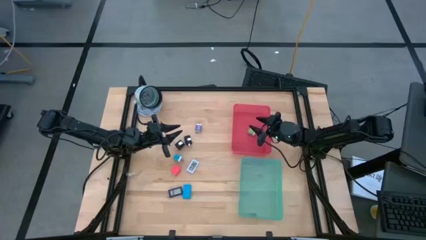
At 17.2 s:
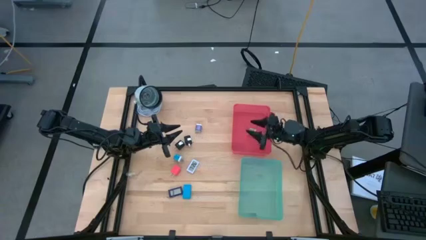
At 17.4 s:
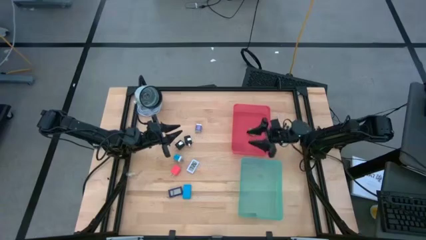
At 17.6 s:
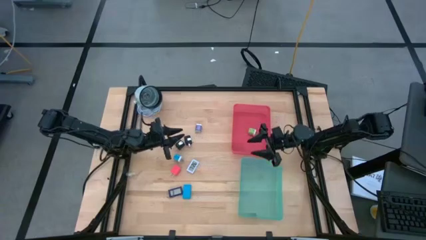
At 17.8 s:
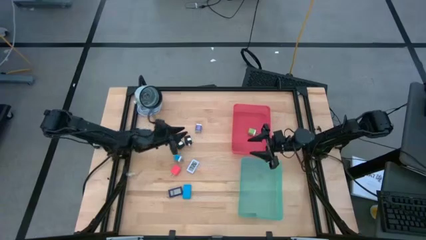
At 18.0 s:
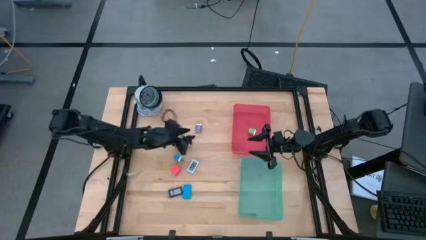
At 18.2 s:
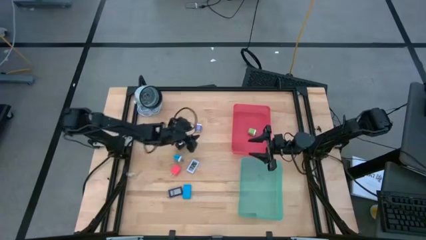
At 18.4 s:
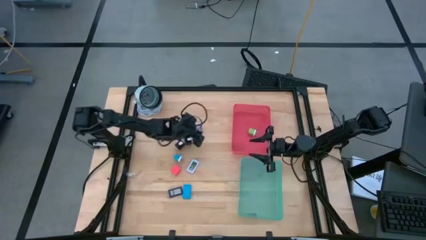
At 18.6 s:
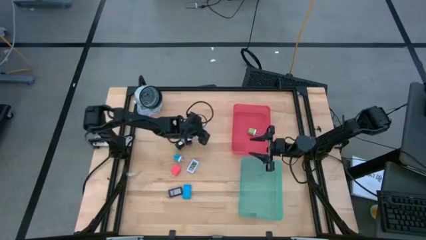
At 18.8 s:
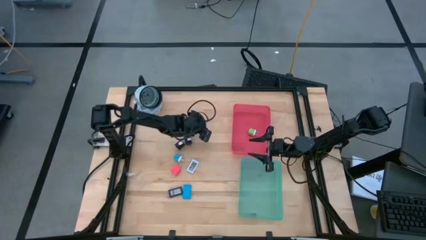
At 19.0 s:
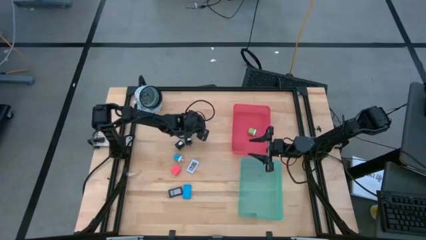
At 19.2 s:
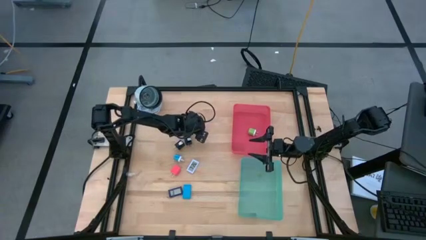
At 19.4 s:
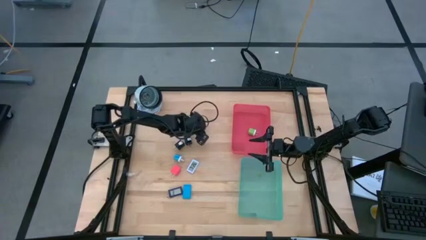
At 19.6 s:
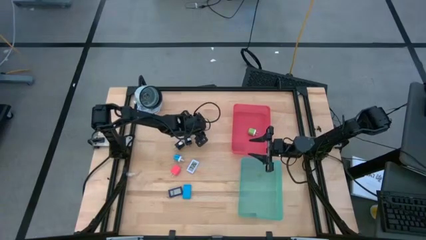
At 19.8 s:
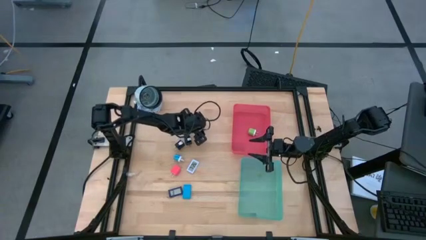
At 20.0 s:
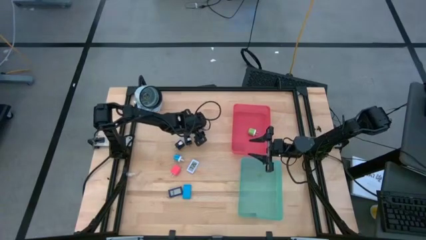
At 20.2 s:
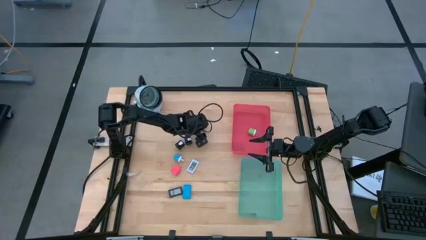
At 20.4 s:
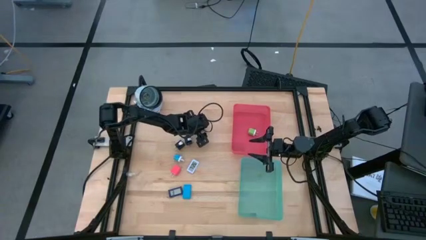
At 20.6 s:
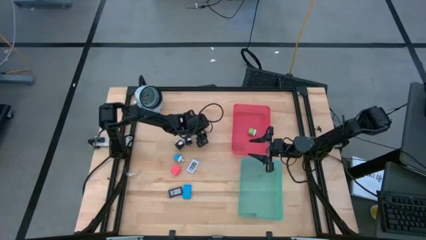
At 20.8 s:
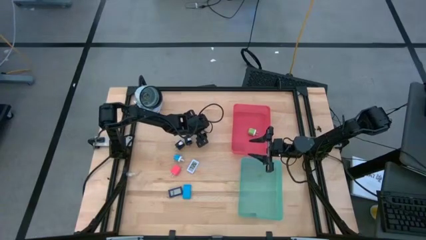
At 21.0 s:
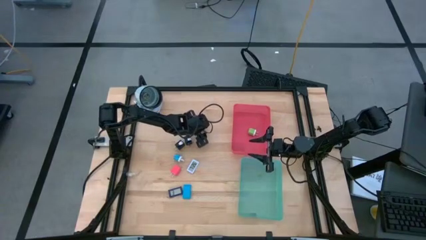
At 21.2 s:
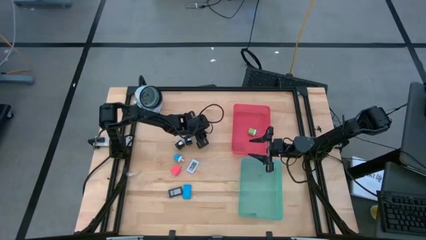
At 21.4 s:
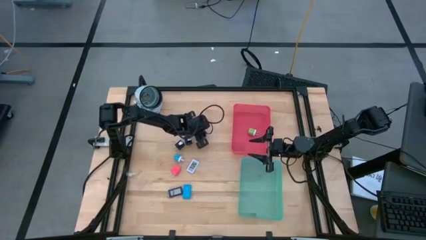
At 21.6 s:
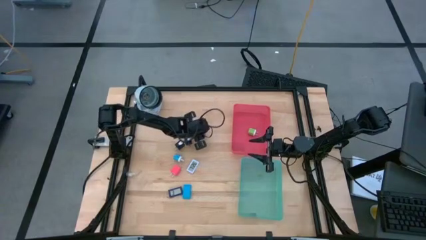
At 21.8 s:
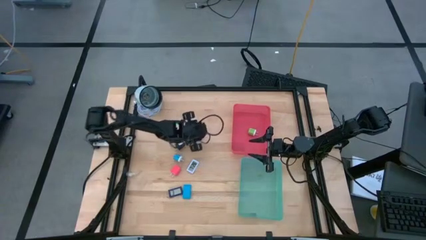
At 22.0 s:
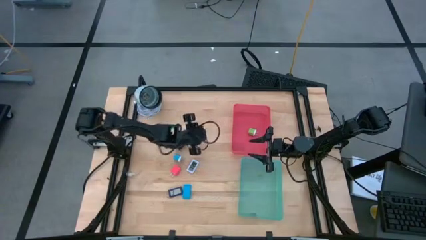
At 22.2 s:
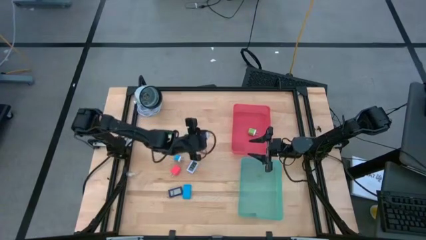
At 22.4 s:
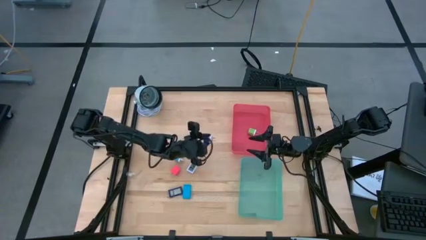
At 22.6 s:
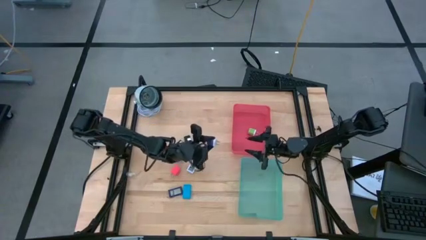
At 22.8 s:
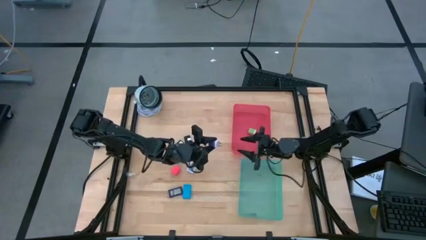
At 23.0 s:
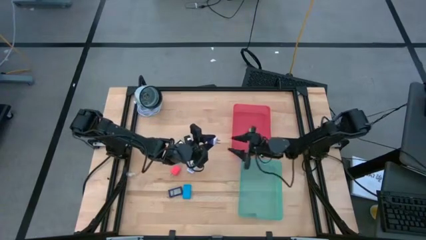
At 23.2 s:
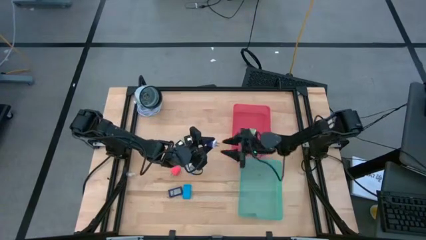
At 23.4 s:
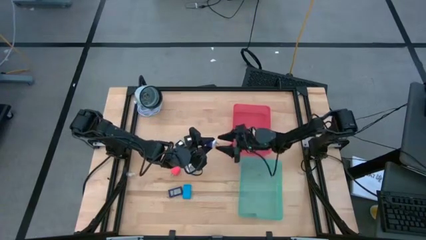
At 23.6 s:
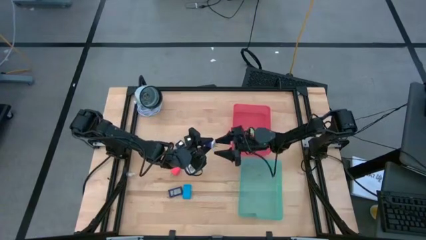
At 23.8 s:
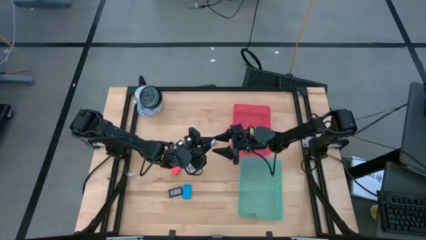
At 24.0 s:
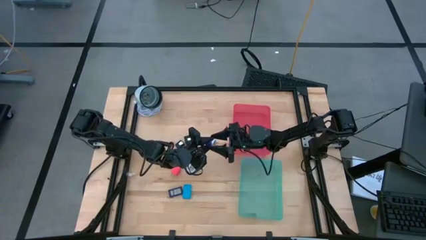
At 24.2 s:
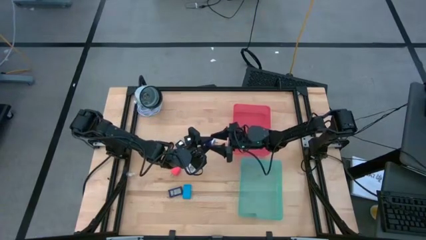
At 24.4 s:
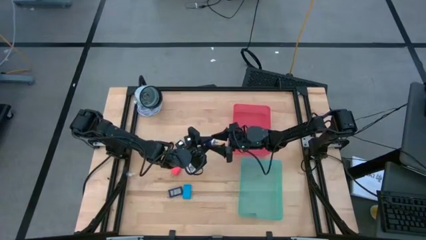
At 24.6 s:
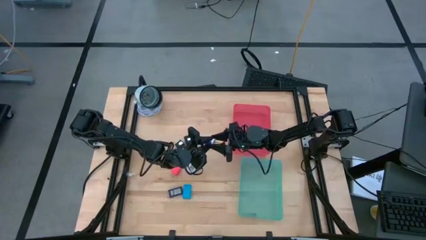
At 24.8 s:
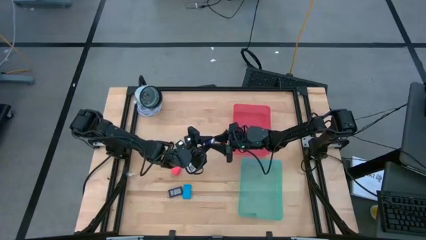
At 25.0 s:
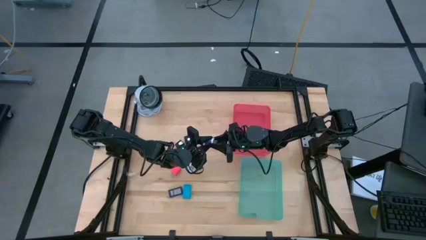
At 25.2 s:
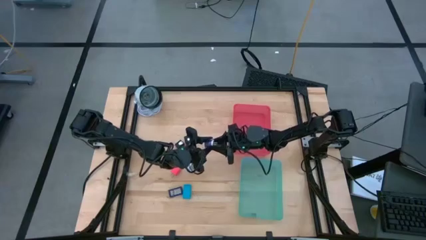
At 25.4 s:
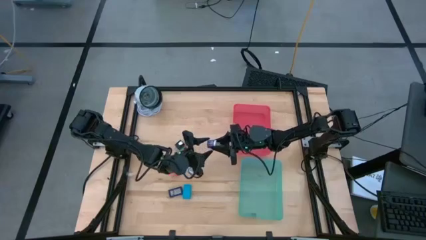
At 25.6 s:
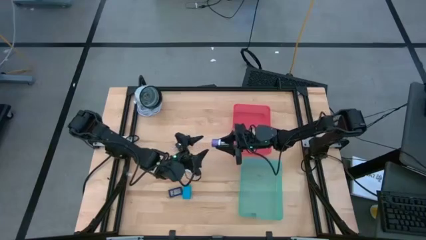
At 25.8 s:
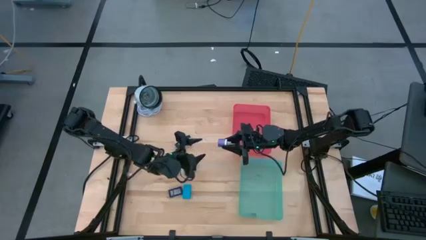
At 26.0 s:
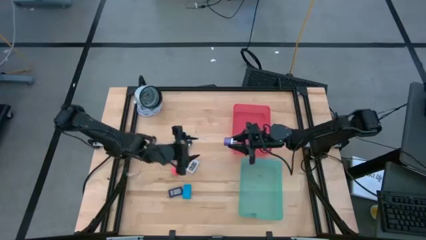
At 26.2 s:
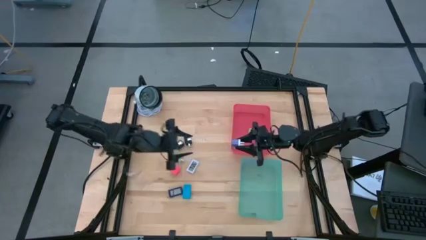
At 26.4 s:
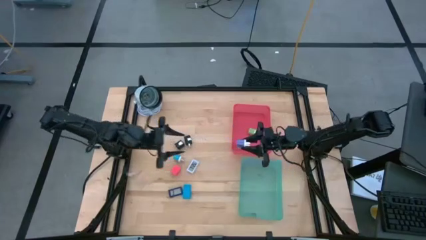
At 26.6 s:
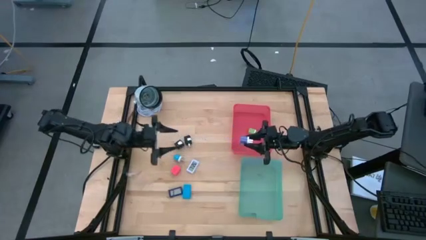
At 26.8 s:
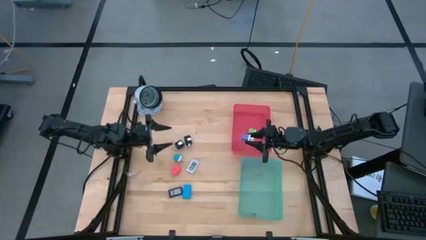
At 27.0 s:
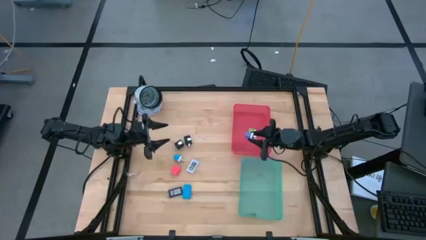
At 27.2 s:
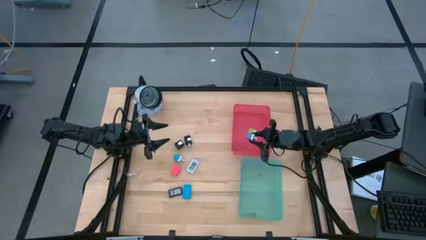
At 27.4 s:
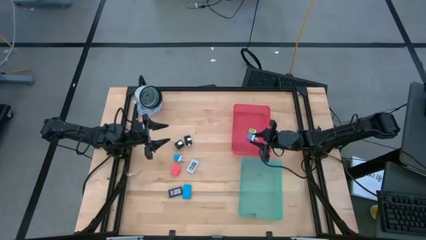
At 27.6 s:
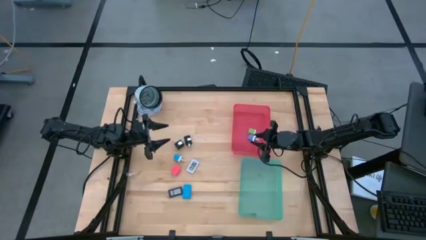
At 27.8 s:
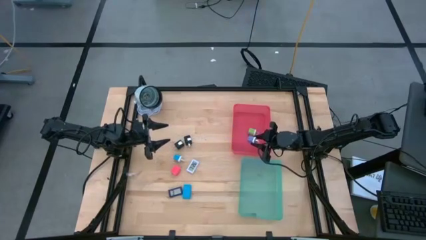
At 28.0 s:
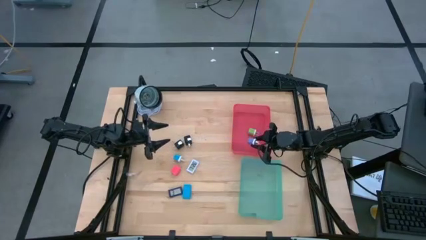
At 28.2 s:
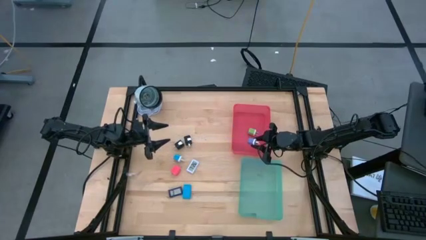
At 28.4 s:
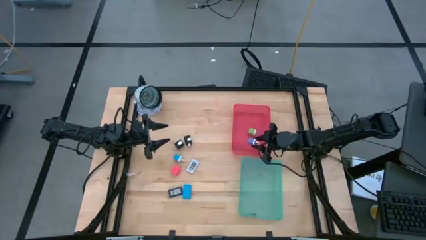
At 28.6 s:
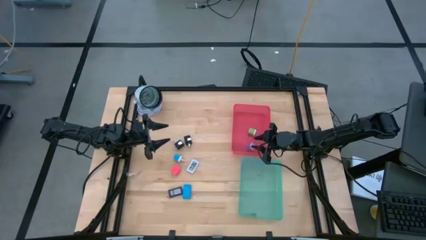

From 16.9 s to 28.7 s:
Task: Pick & Place Office items
Put the violet charger adapter into the red bin

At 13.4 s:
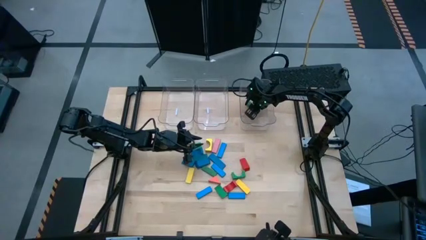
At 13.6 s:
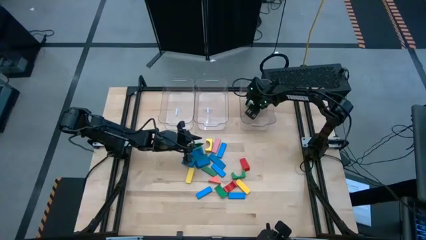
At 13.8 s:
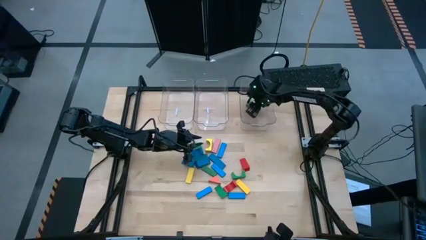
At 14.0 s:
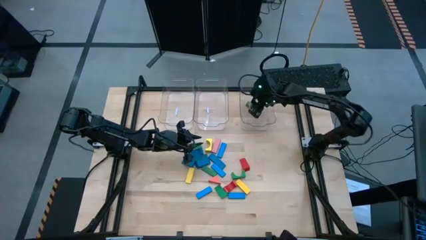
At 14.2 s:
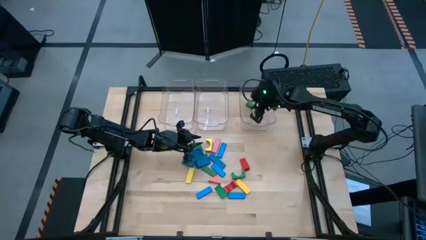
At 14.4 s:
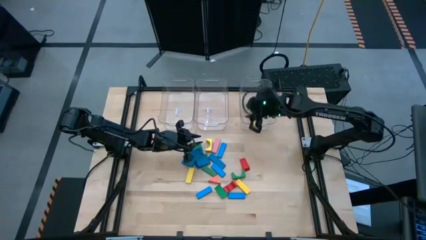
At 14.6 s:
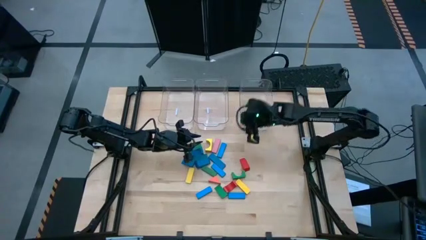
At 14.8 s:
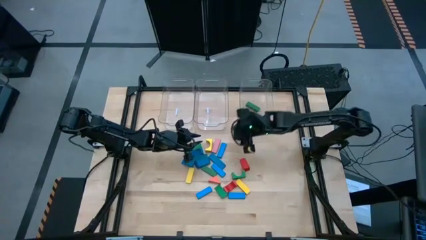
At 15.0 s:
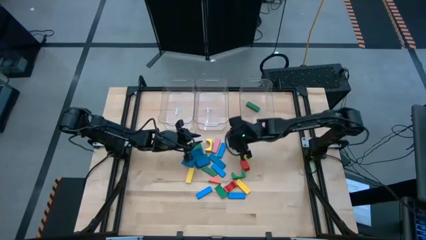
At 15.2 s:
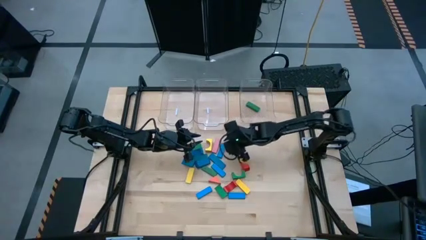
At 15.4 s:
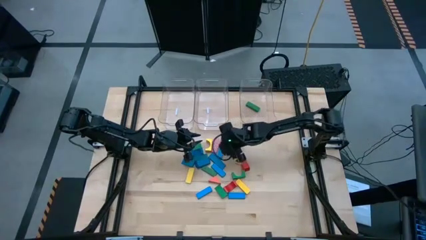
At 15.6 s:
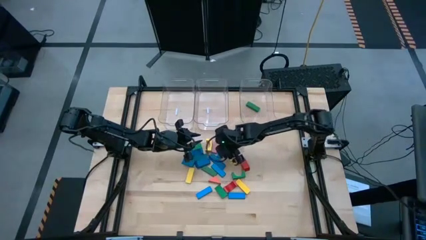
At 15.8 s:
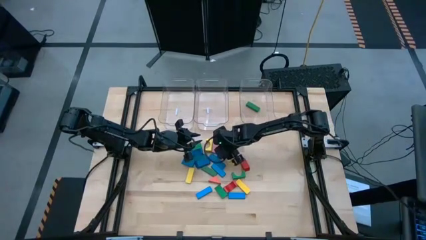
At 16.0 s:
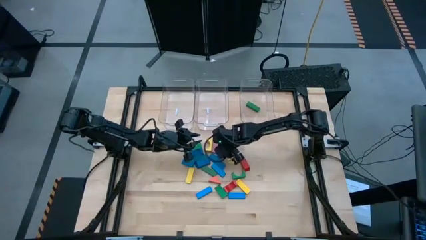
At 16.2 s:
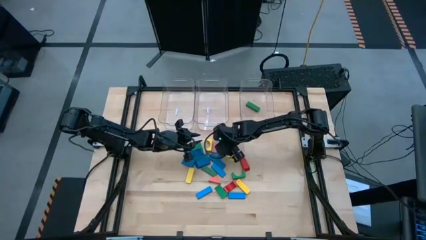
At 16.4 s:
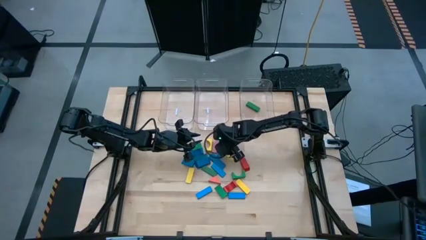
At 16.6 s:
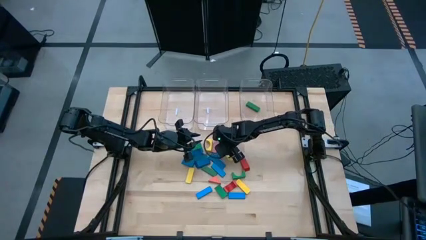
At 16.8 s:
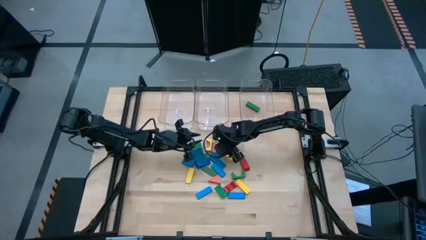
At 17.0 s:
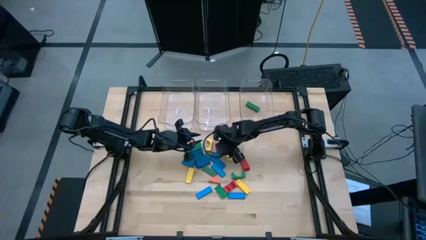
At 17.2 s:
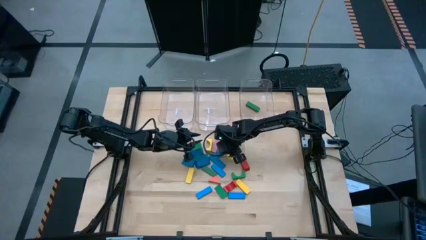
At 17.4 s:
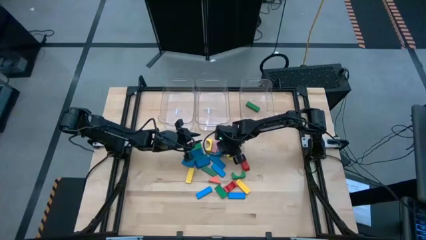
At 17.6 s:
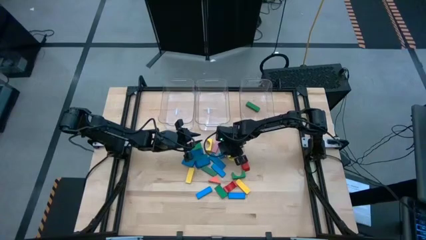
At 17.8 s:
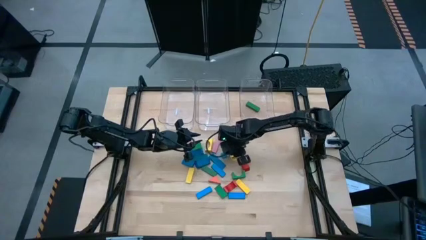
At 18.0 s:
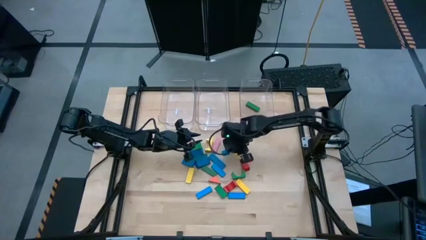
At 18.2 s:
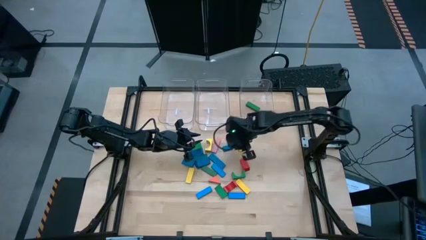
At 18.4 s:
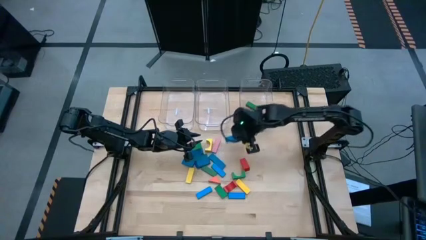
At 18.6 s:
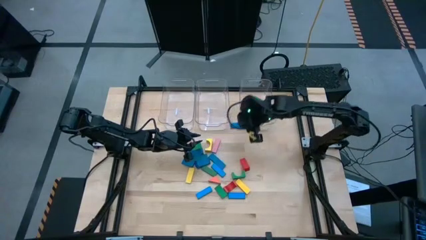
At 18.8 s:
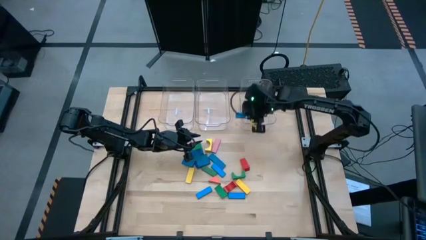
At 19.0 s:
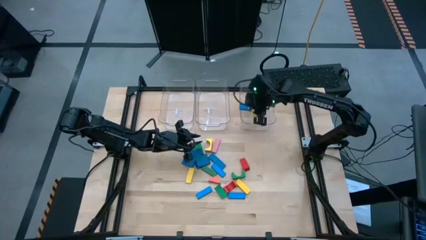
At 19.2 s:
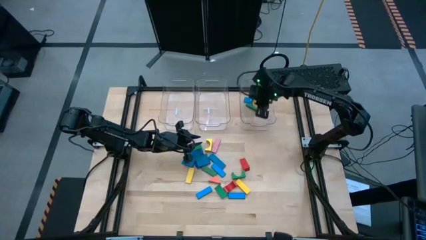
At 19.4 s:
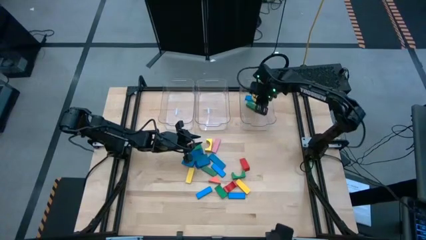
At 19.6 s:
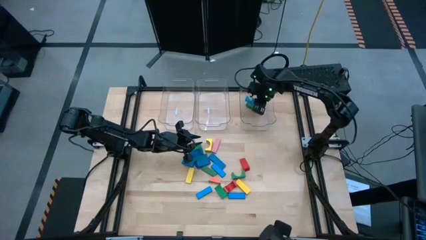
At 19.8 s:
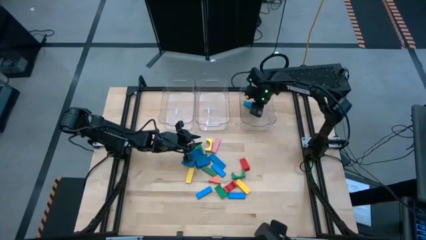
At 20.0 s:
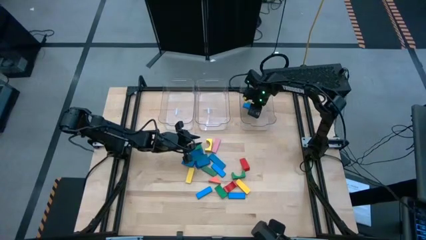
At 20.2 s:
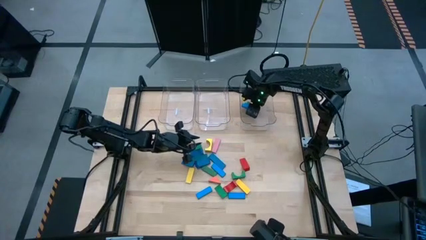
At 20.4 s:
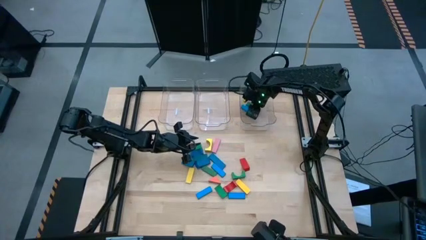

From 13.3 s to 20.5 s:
Task: Sort blocks by size
Put the blue rectangular block into the right transparent bin
